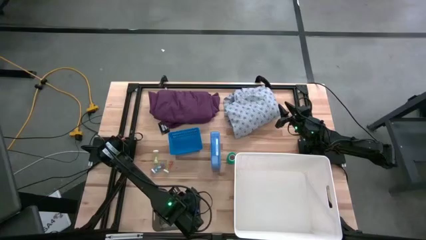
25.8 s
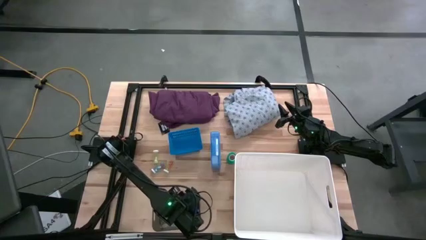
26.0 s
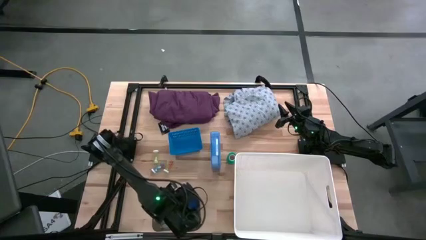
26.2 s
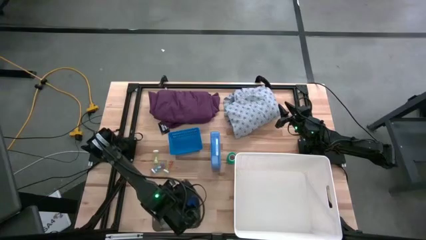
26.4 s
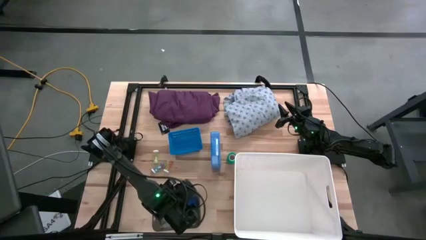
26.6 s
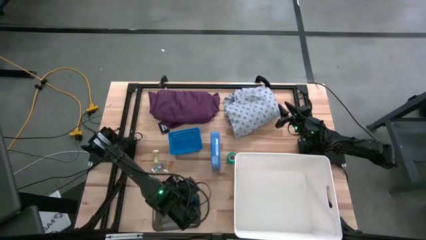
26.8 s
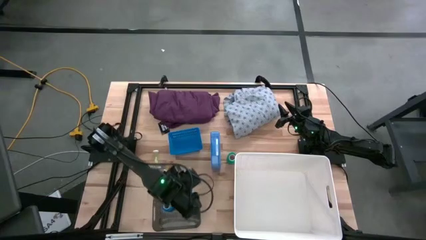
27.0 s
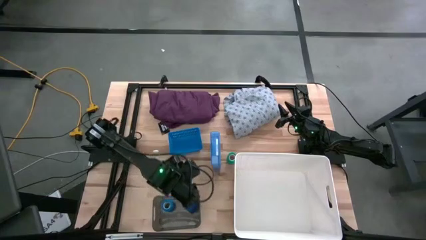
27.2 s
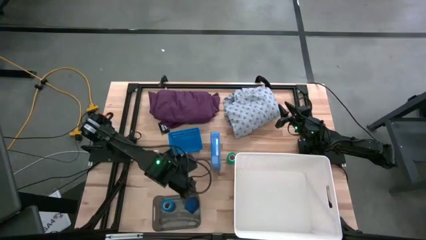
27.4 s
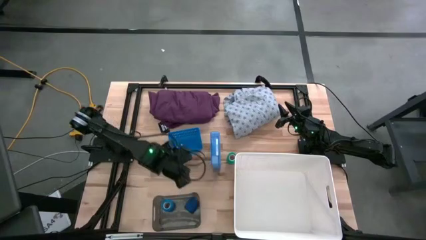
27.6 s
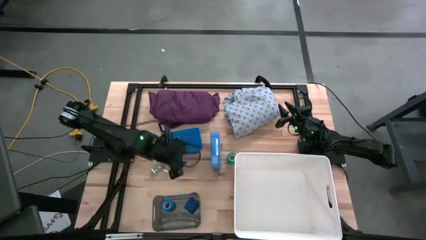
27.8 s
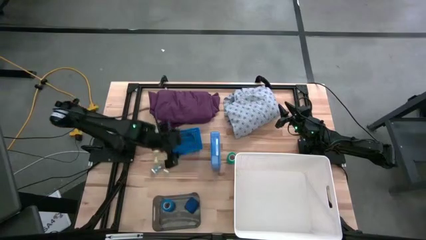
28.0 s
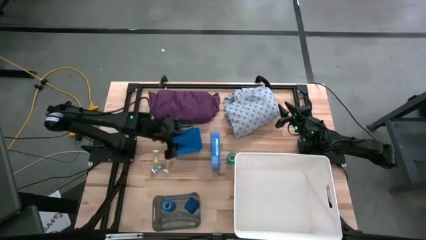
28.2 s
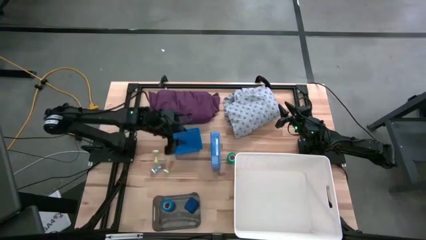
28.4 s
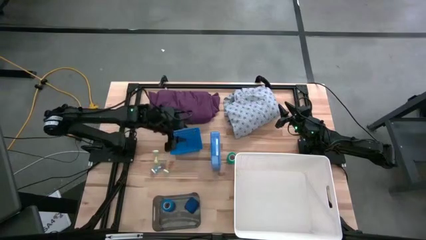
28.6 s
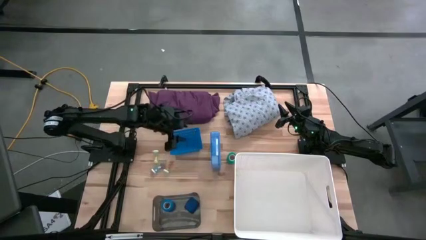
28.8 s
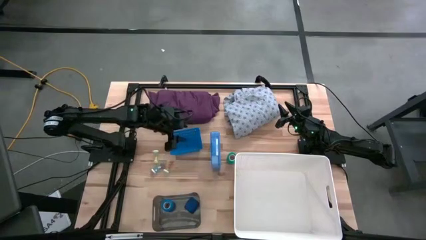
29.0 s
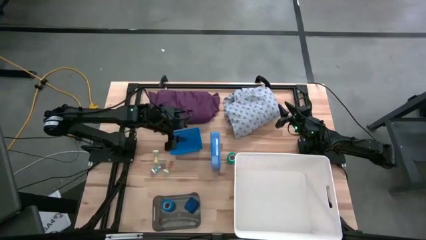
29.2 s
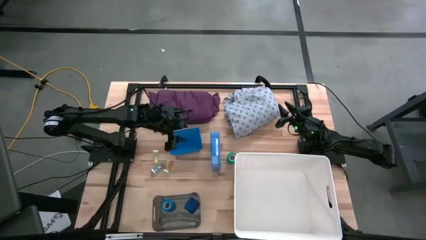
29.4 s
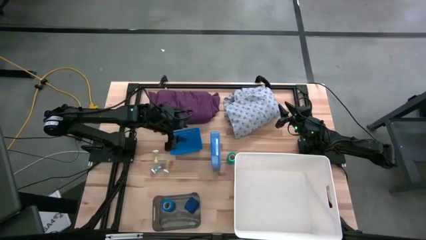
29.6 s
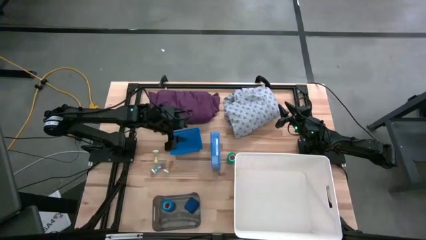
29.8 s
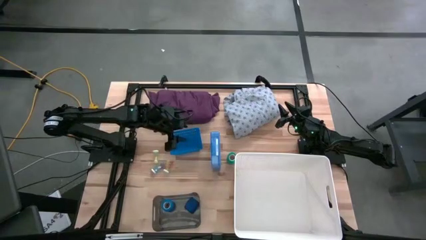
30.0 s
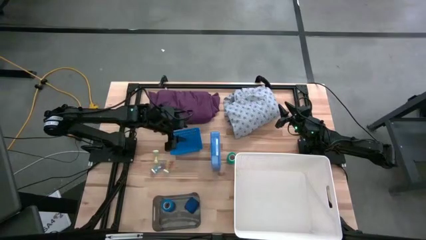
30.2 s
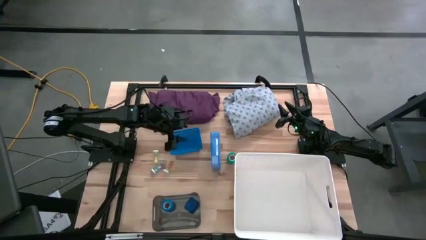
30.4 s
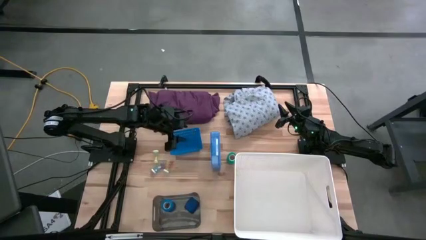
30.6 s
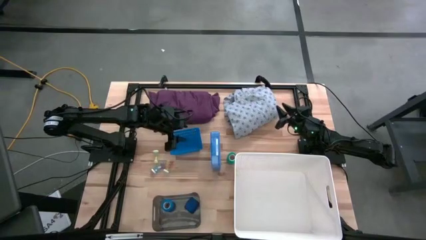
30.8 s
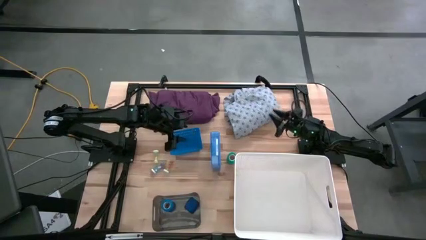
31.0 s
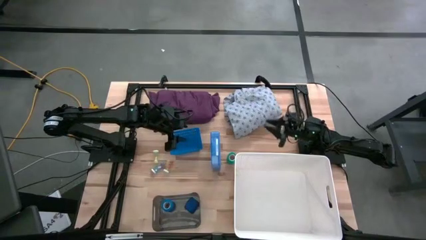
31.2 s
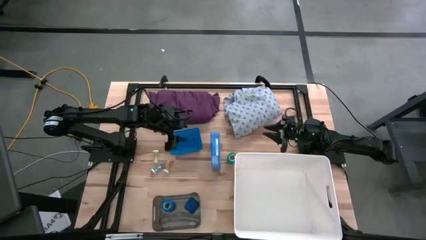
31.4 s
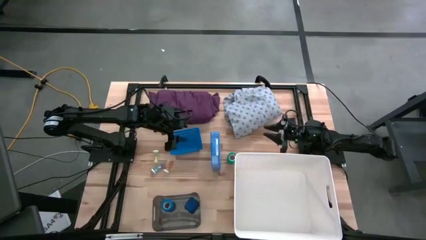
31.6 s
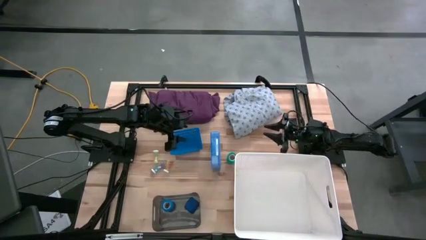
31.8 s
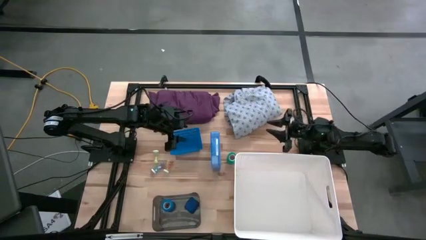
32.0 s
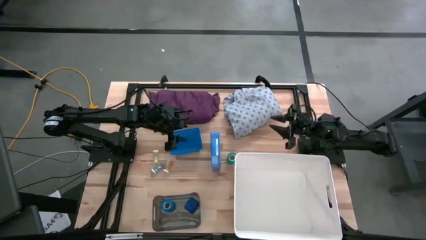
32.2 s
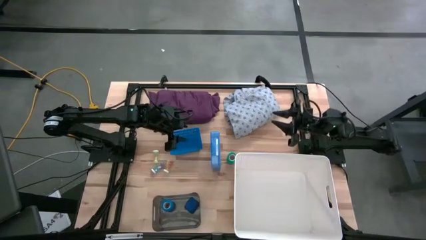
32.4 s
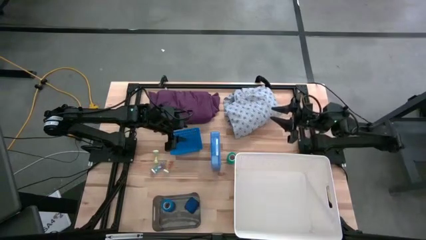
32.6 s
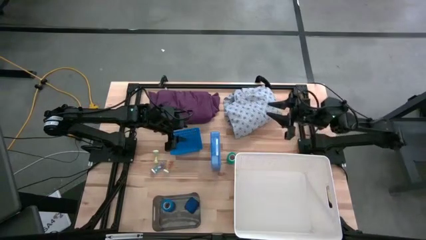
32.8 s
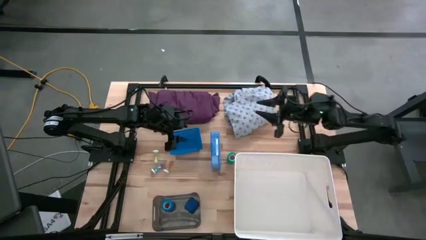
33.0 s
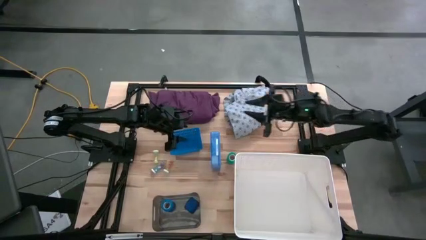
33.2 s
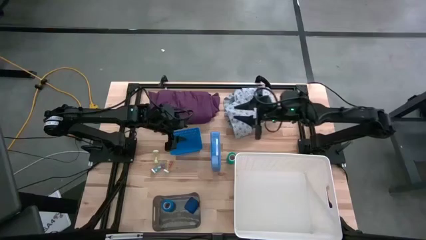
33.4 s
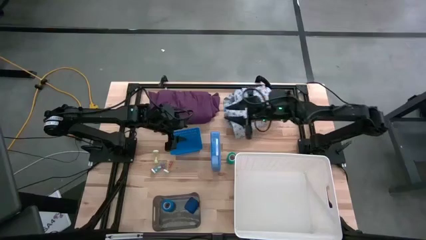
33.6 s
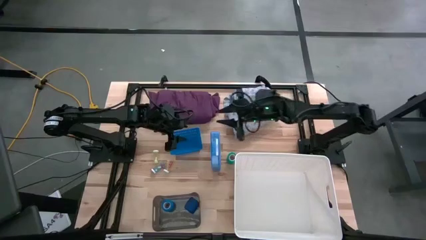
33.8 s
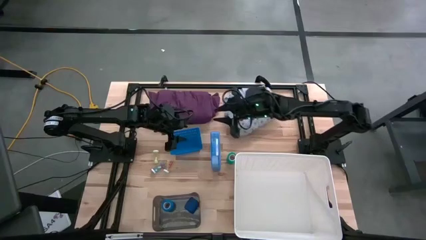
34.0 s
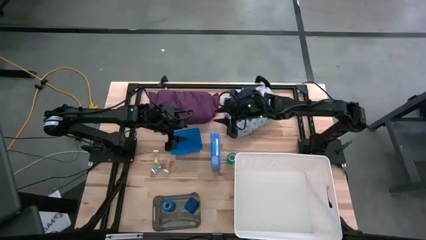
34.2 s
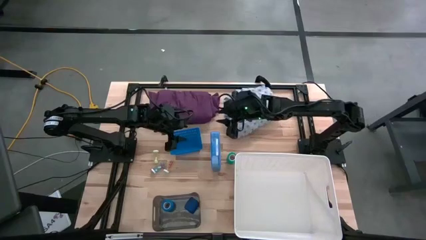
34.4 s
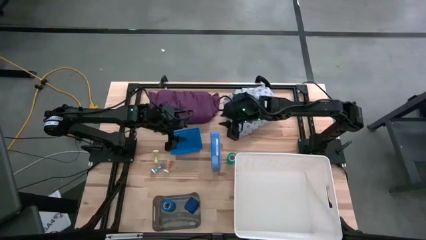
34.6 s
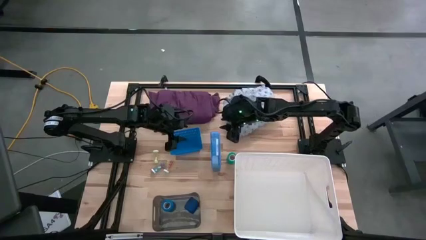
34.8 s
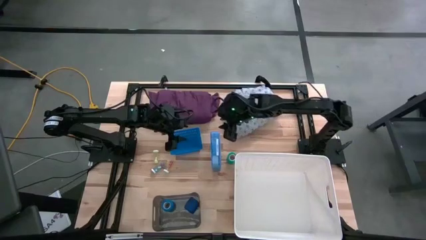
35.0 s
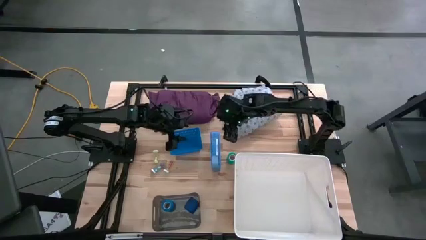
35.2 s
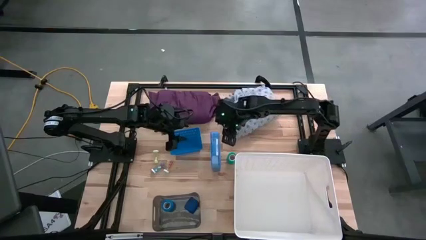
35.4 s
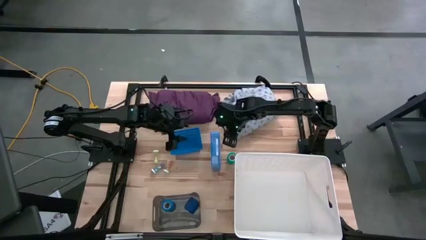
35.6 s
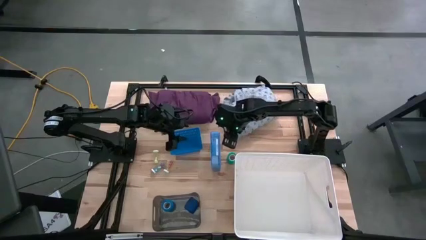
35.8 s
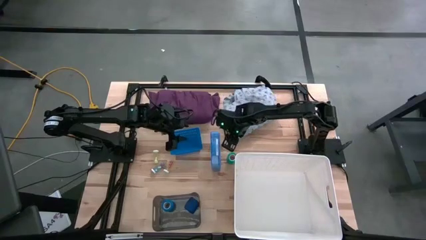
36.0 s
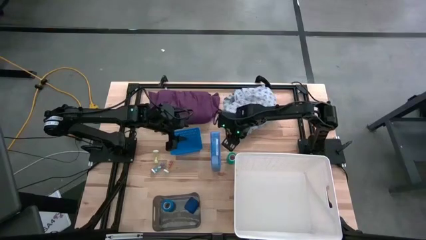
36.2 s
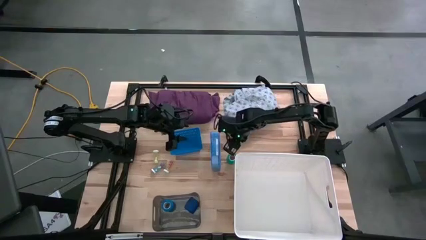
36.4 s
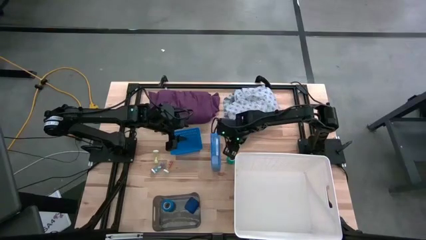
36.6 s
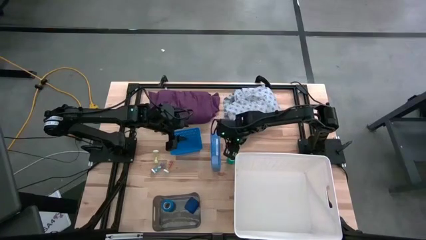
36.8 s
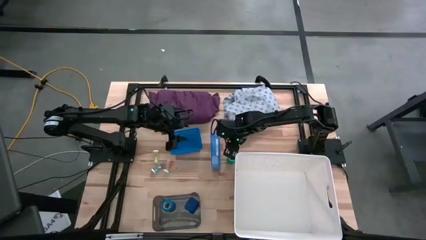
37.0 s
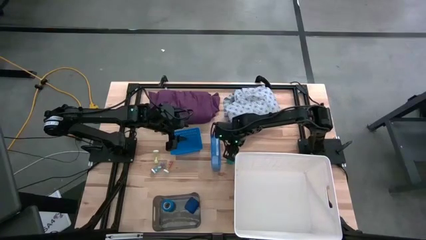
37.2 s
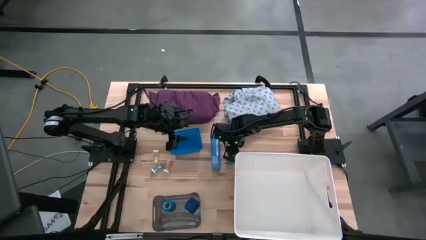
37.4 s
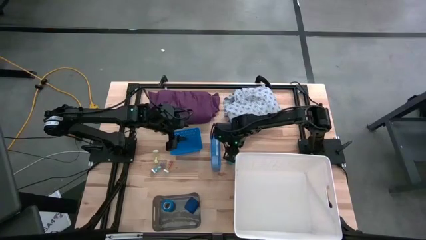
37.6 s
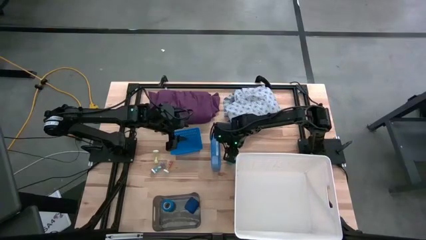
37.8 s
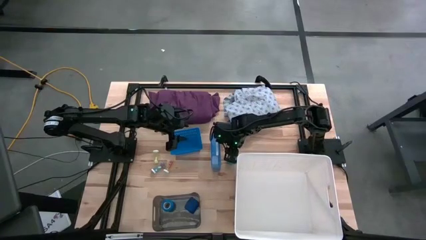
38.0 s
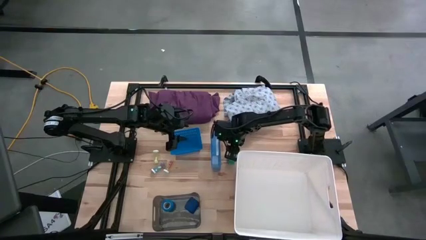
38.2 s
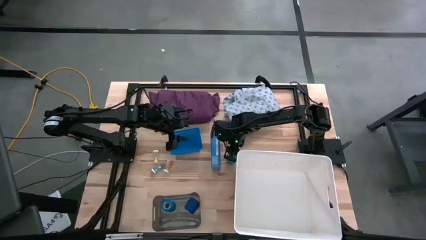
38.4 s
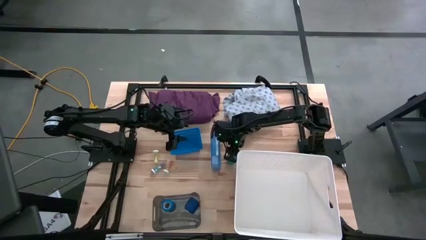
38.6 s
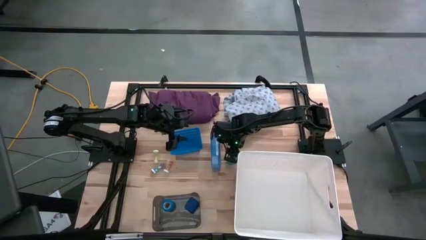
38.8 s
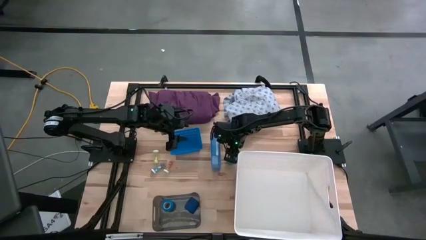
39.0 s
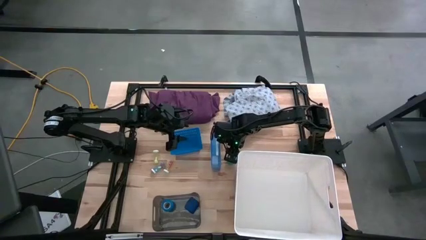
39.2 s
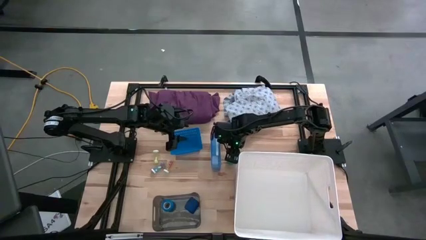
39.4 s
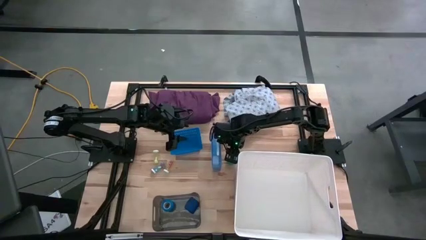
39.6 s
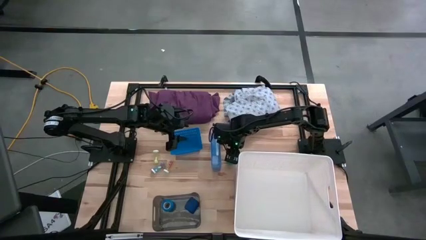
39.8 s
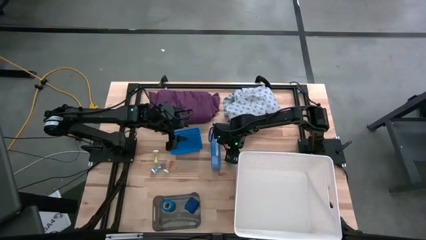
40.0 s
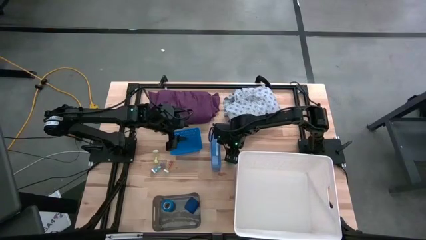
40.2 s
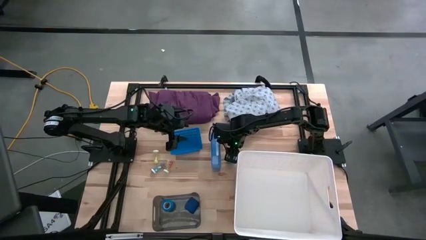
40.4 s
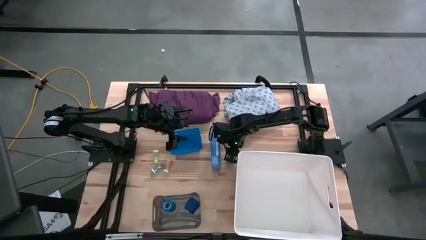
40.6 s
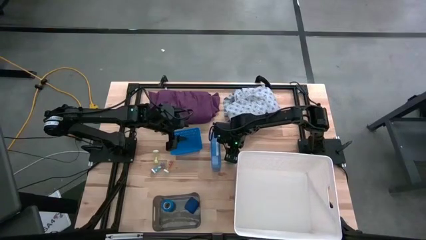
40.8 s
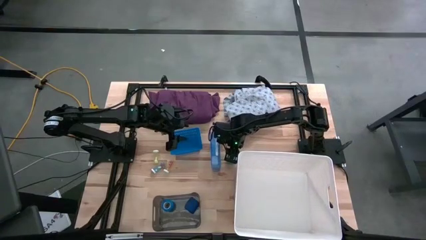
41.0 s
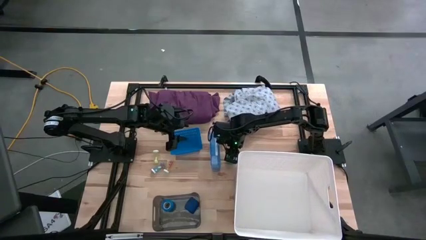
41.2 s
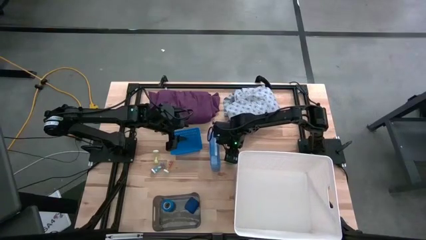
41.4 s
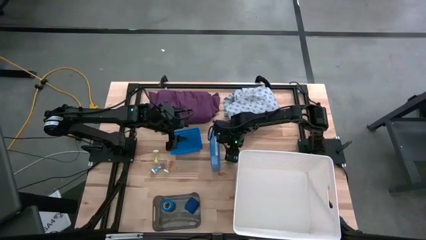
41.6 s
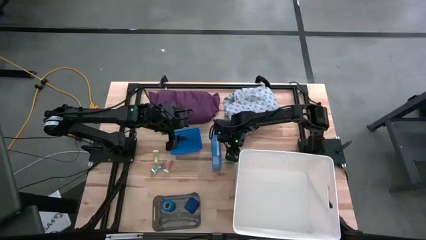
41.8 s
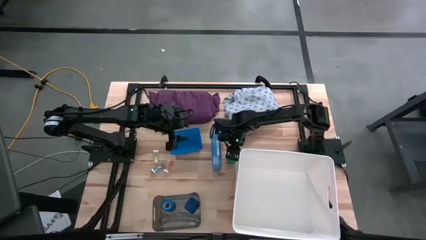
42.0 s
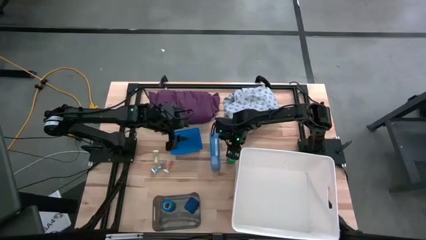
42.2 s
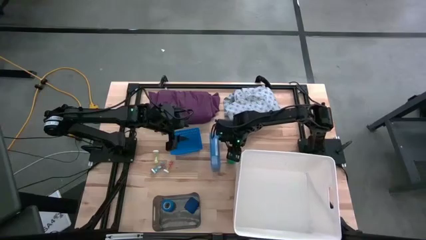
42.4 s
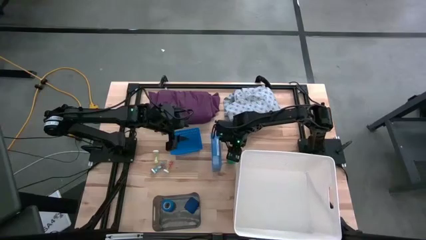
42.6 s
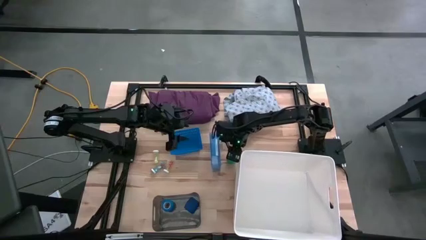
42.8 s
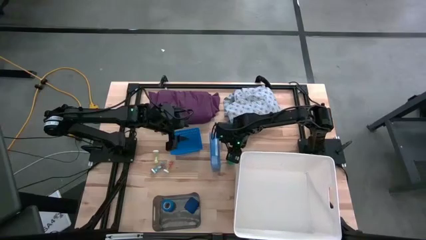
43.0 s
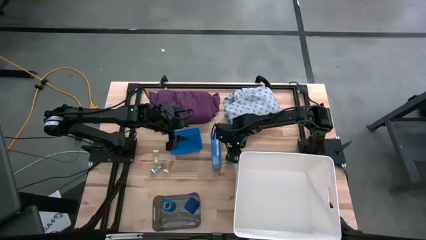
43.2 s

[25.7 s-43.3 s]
Task: Pick & Place Medicine items
Put the green bandage into the black bin
